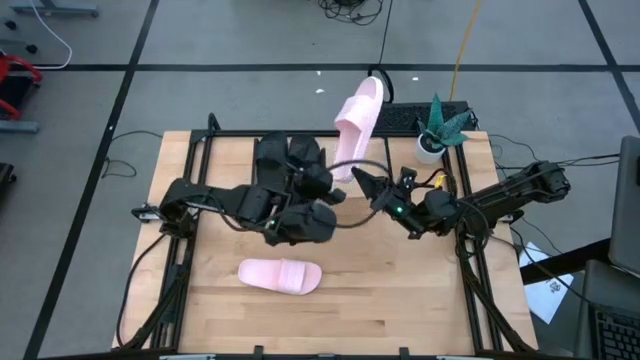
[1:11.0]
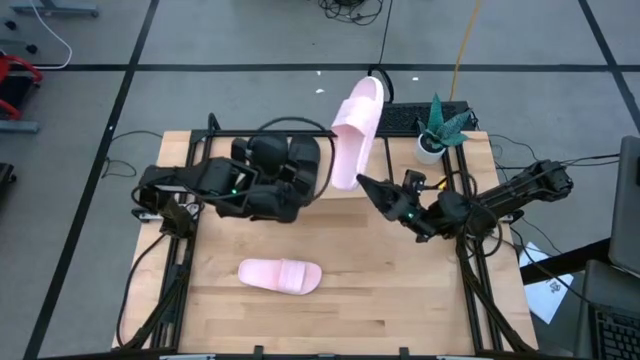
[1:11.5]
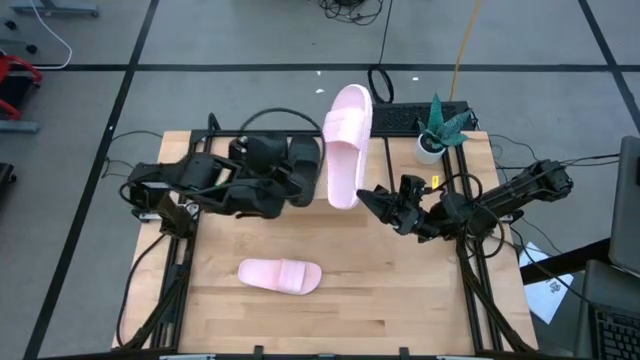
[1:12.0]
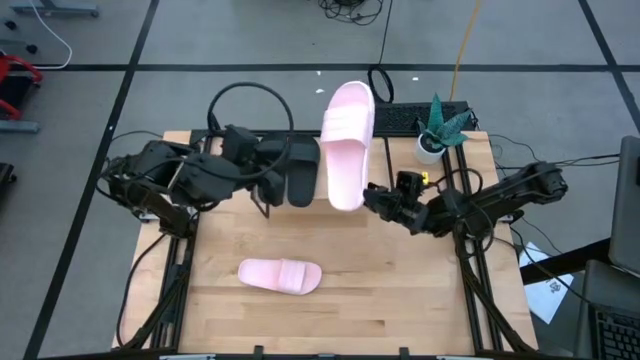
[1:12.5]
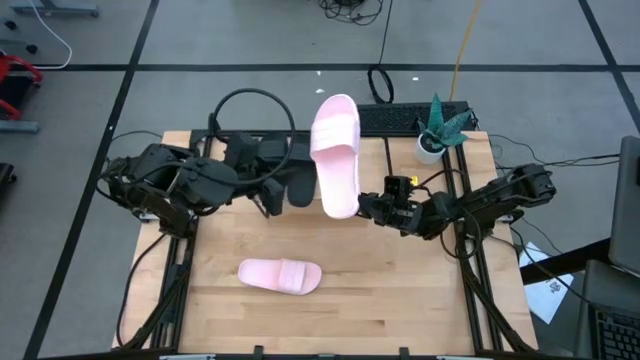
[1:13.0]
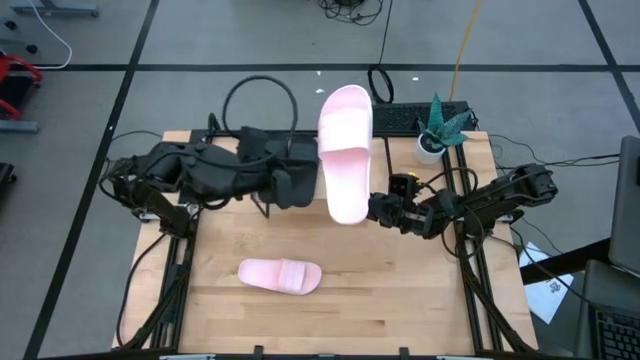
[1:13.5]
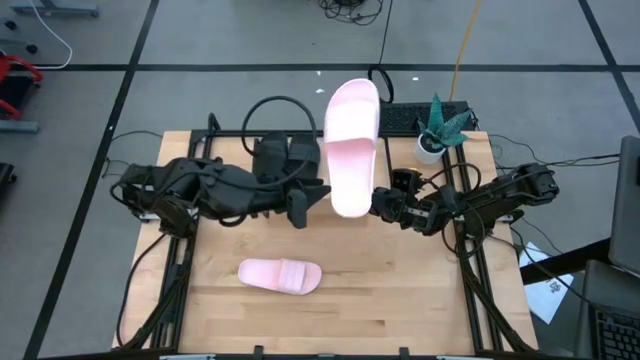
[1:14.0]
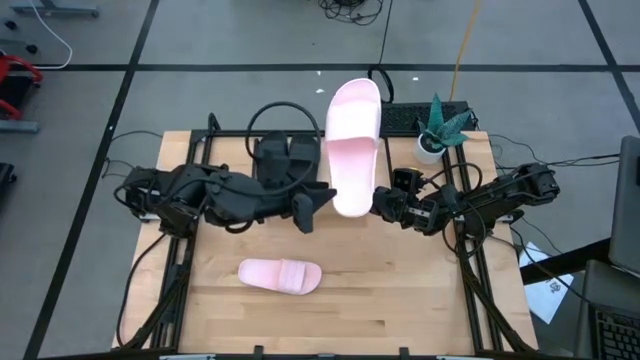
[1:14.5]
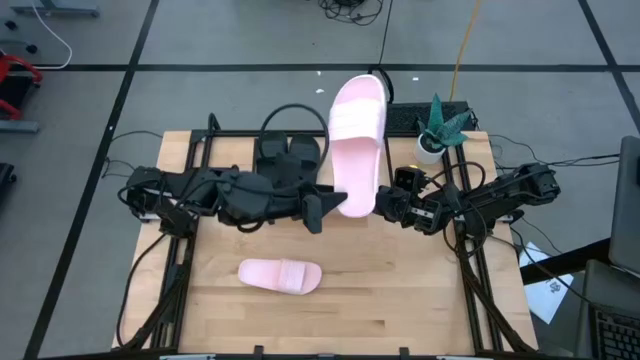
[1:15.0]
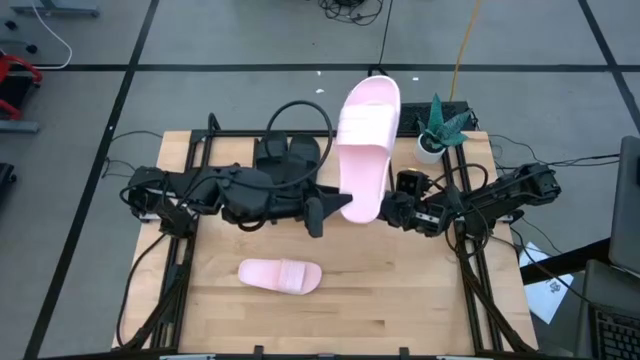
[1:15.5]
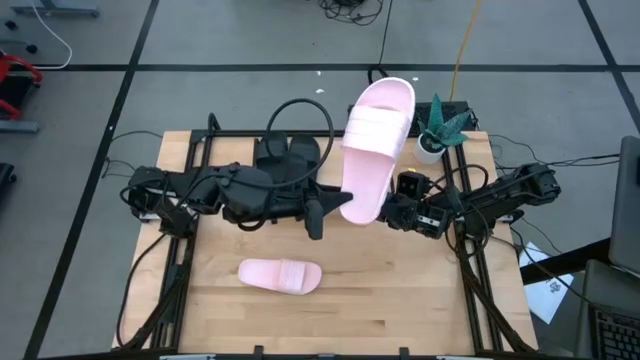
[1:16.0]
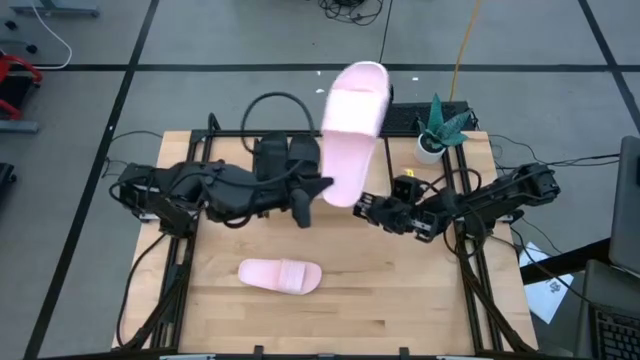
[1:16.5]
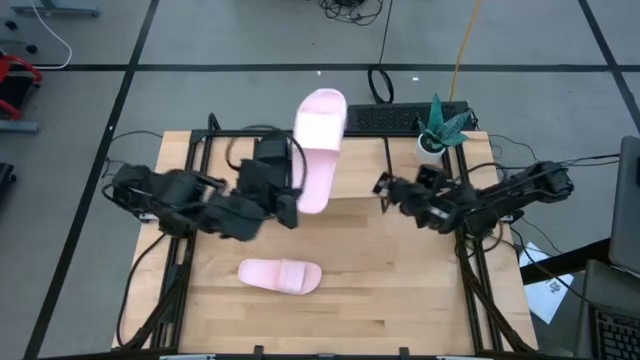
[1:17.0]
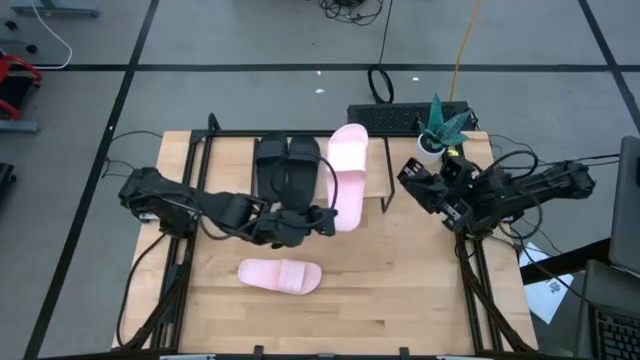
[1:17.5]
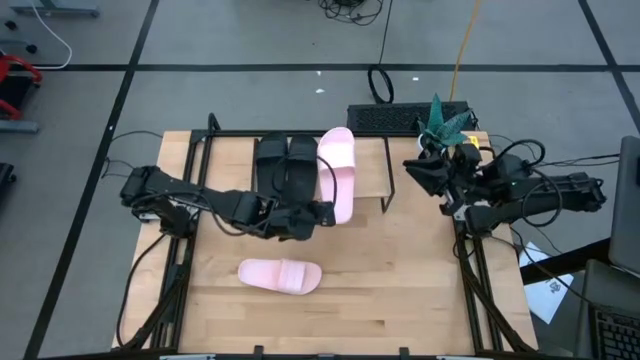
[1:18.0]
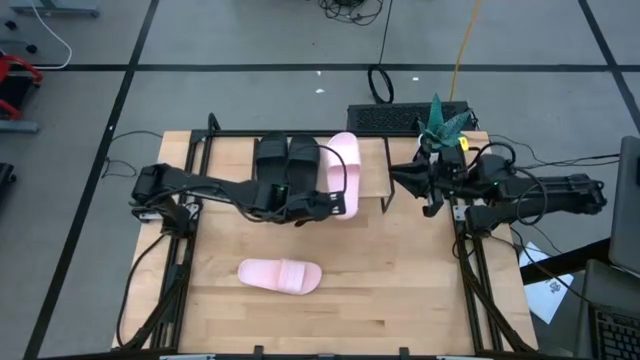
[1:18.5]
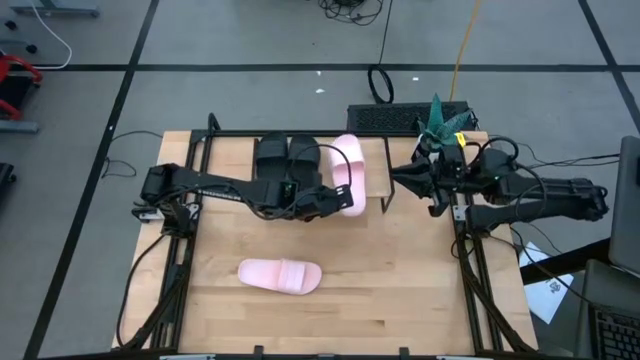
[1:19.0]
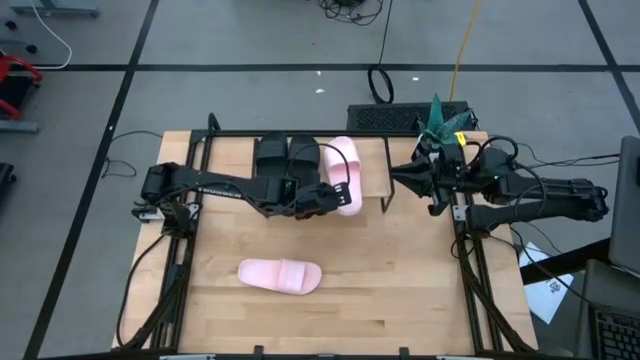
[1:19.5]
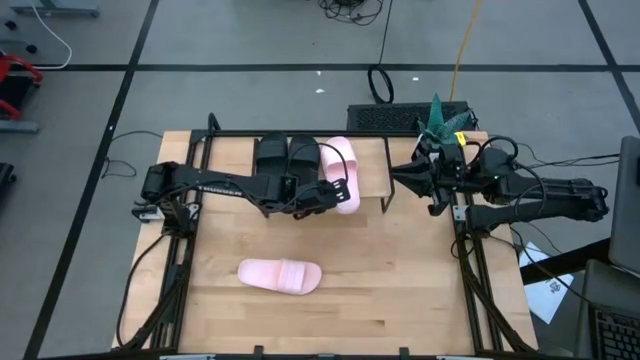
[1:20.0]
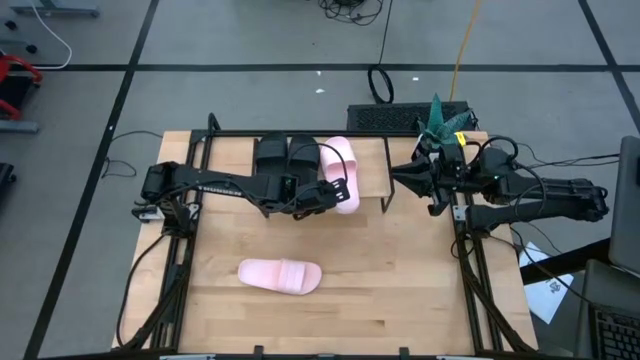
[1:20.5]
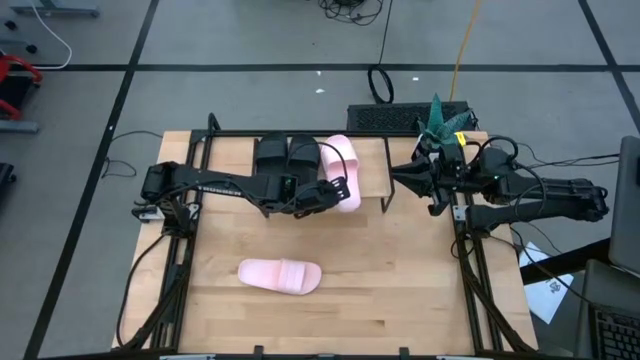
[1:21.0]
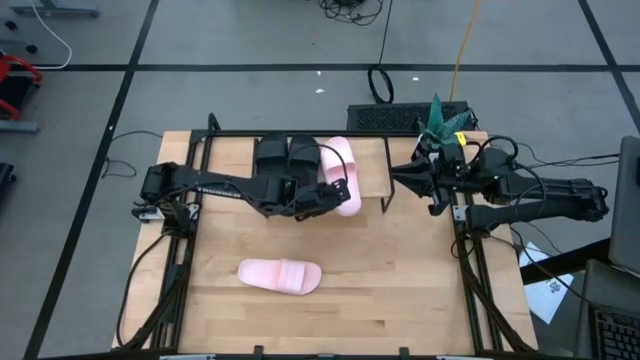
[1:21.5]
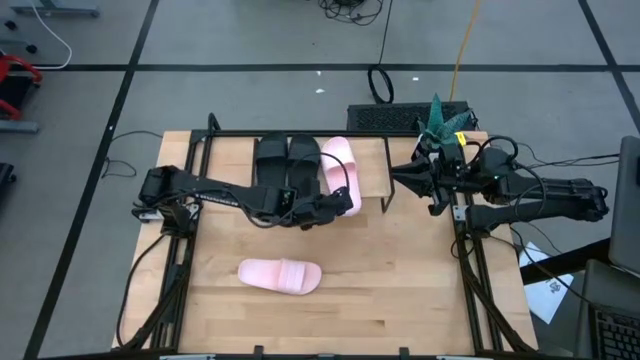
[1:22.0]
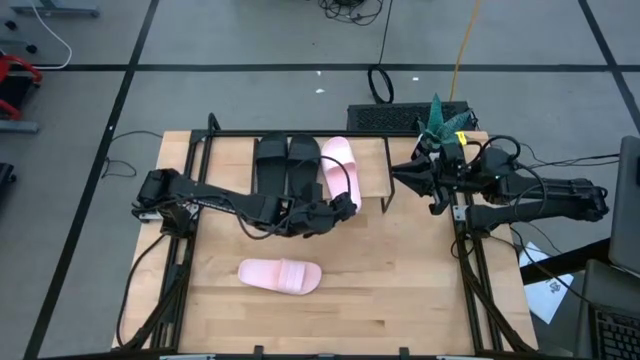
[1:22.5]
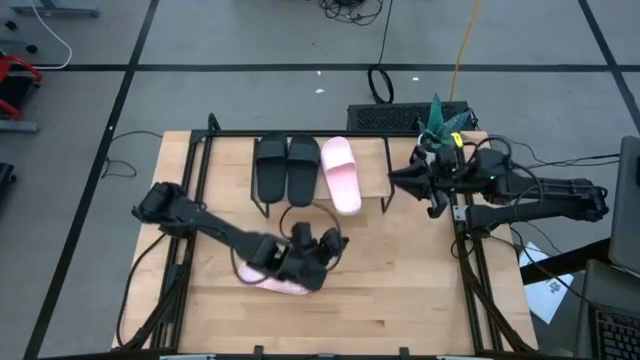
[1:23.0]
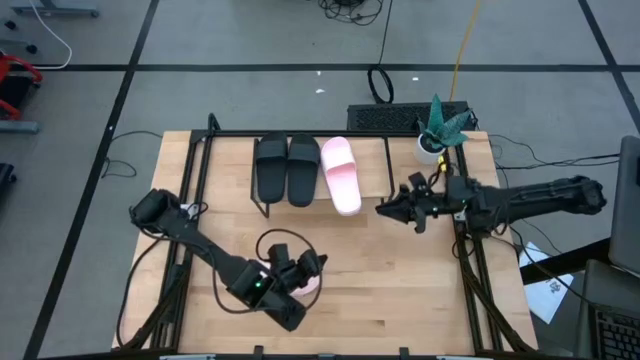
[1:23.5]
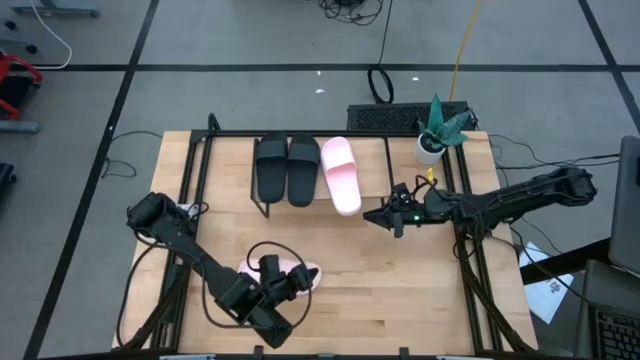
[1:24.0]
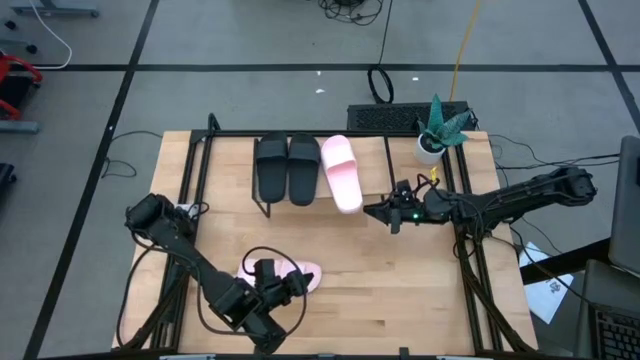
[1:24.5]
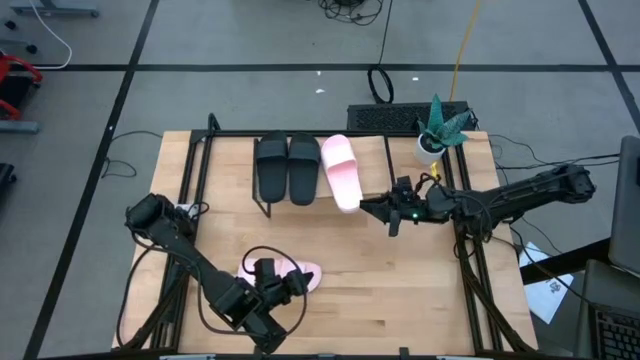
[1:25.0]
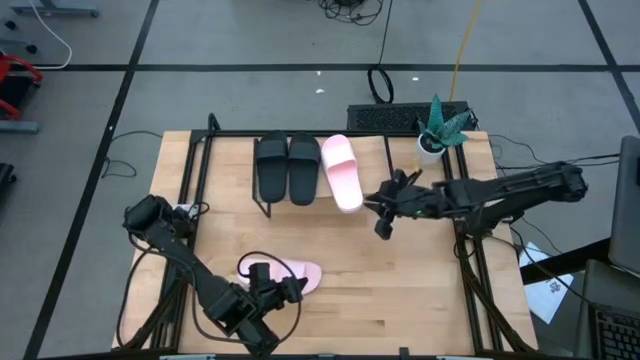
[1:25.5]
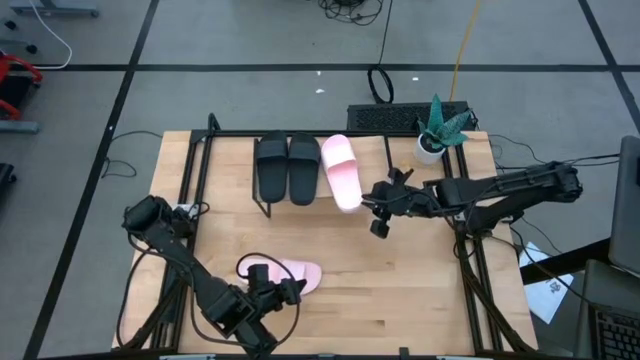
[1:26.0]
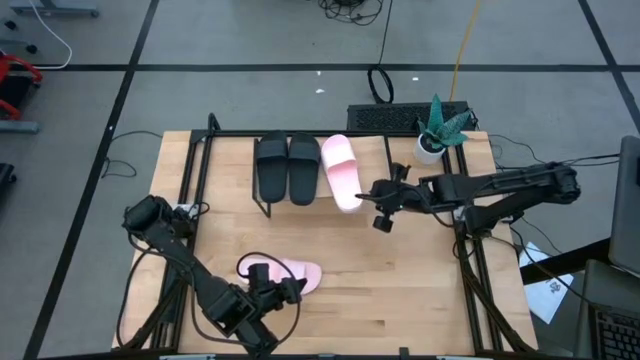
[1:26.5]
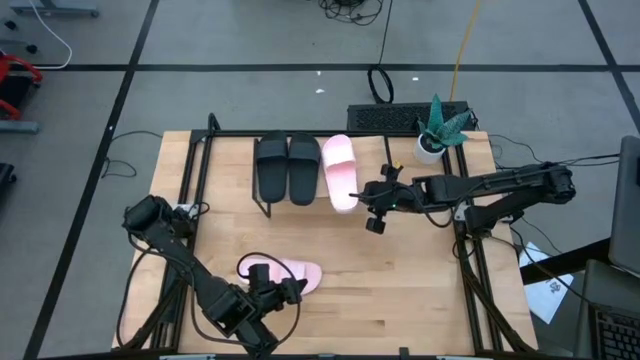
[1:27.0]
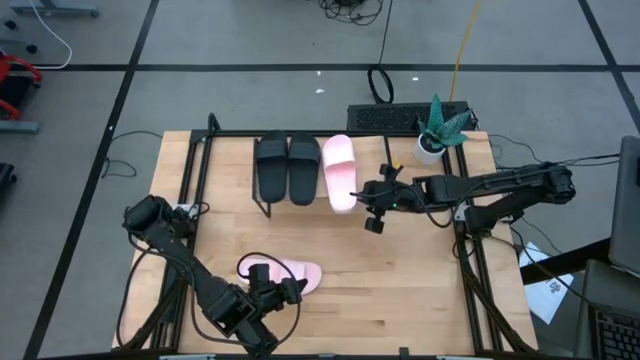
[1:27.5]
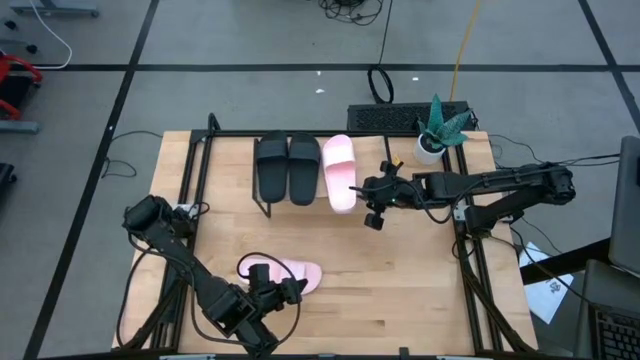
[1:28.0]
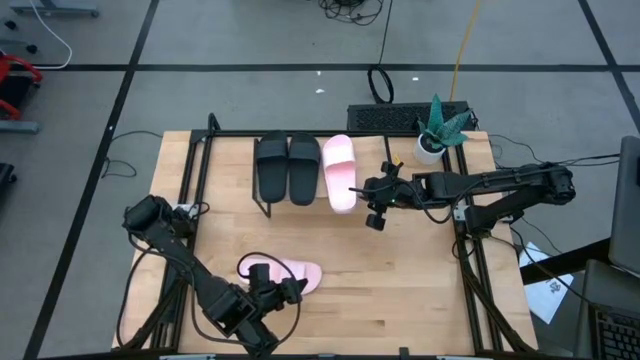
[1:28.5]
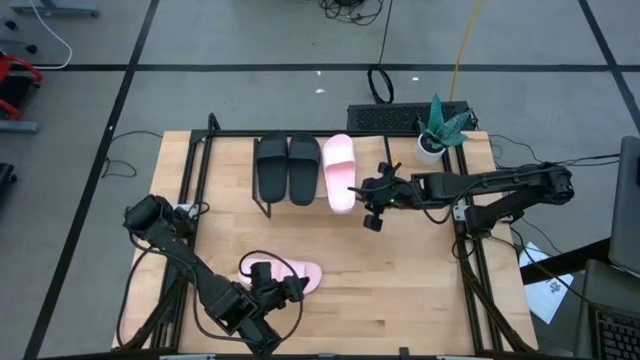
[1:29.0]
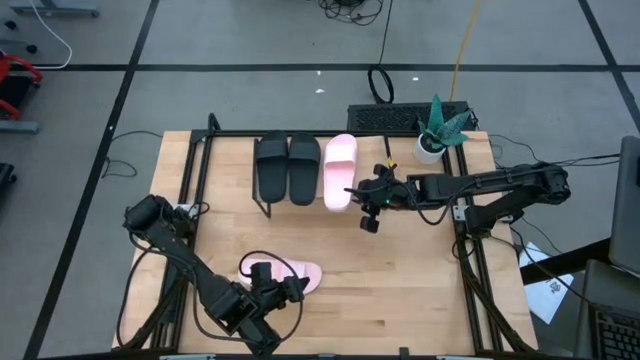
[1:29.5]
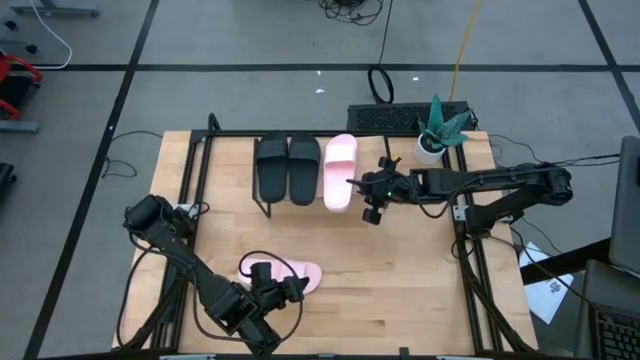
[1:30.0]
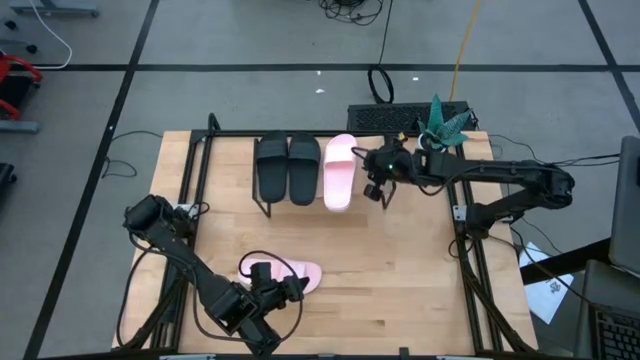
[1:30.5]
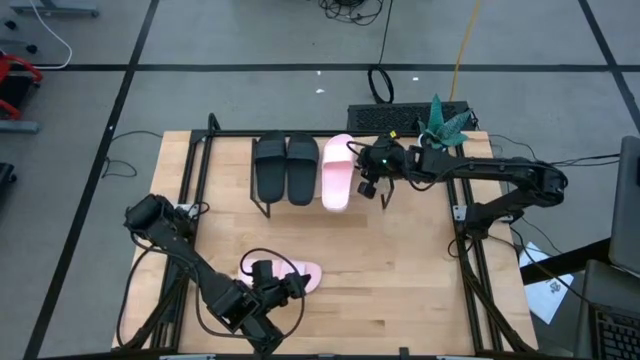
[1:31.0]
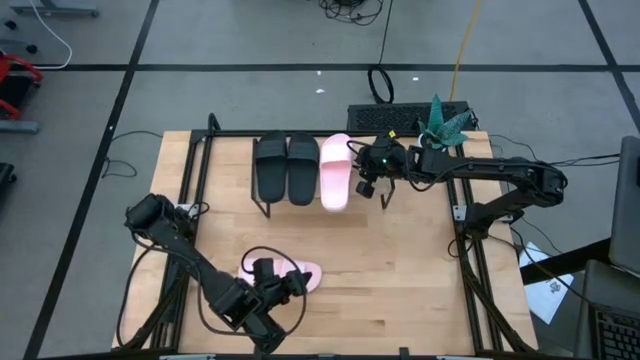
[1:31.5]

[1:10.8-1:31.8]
Task: Pick and place slides into the shelf
Put the top pink slide on the shelf
